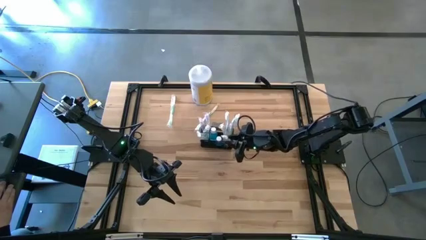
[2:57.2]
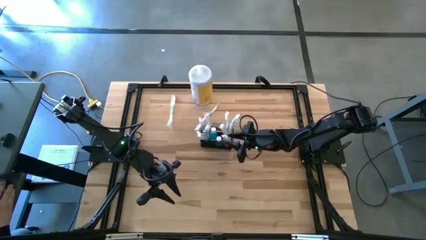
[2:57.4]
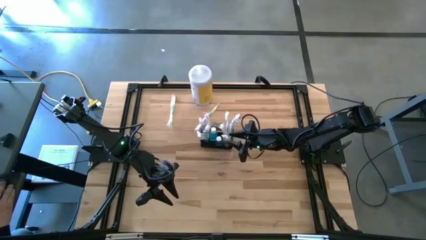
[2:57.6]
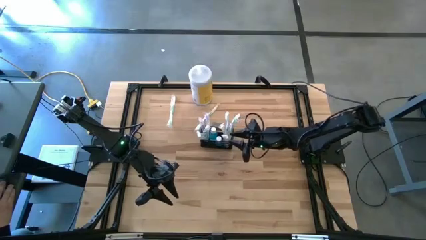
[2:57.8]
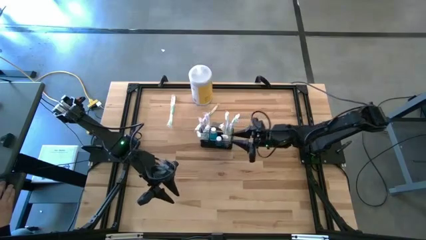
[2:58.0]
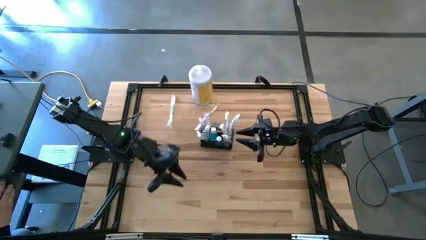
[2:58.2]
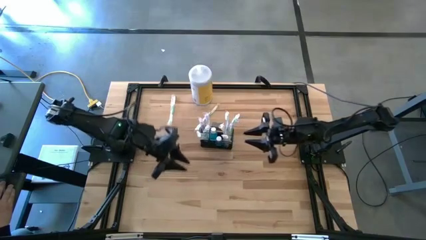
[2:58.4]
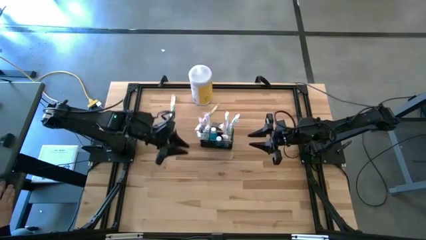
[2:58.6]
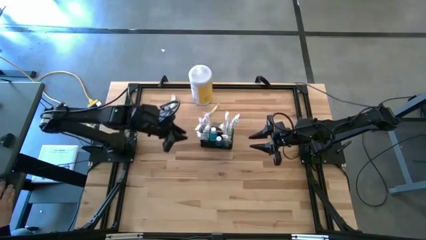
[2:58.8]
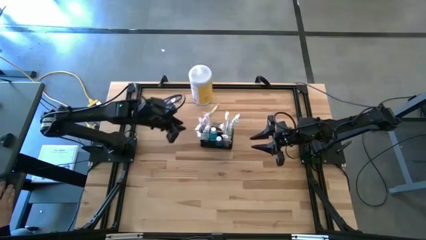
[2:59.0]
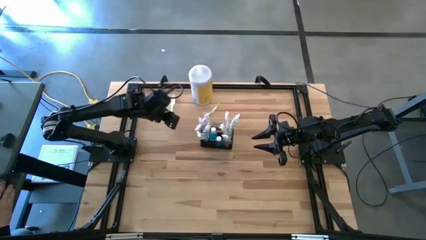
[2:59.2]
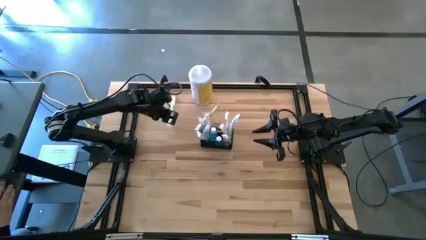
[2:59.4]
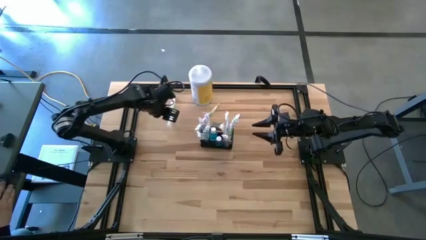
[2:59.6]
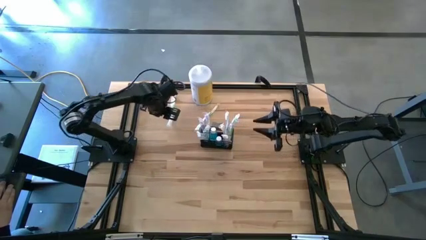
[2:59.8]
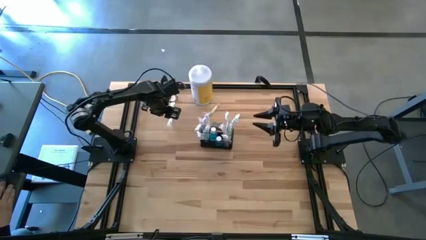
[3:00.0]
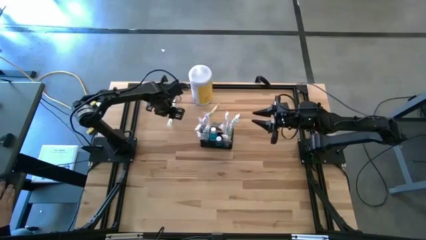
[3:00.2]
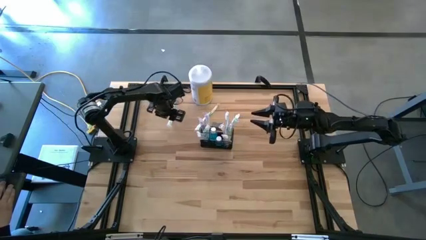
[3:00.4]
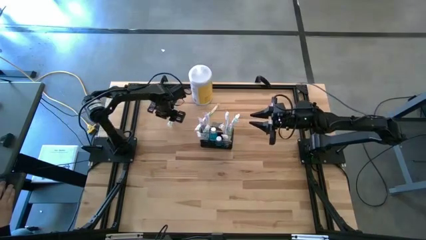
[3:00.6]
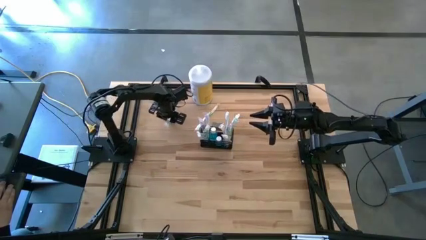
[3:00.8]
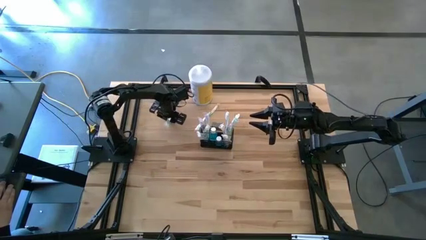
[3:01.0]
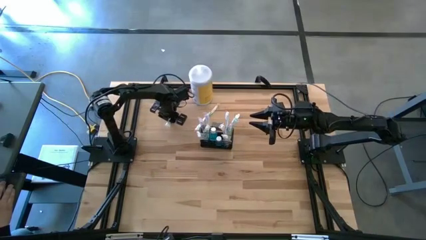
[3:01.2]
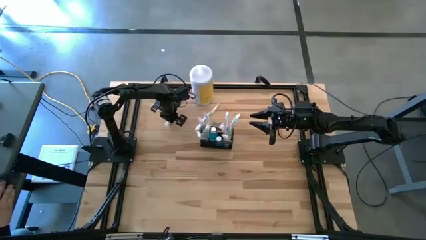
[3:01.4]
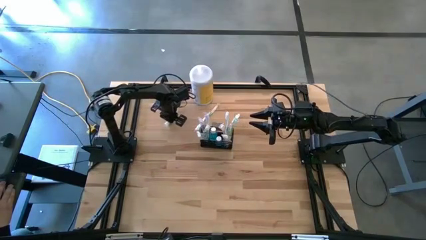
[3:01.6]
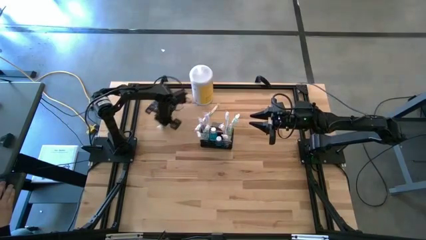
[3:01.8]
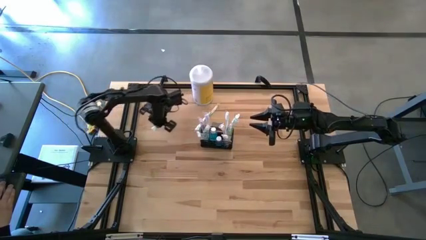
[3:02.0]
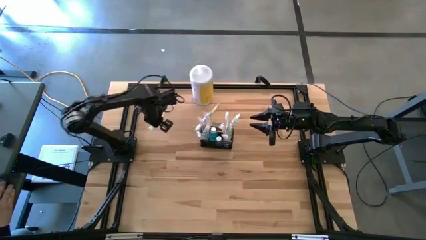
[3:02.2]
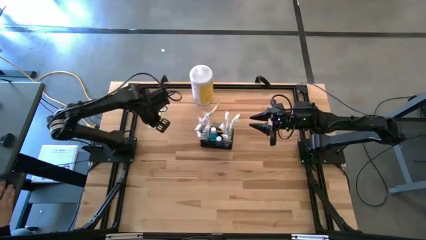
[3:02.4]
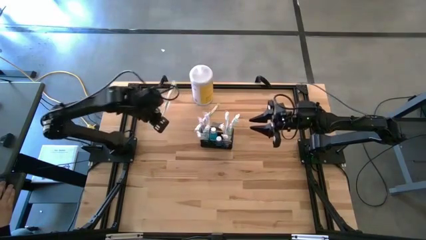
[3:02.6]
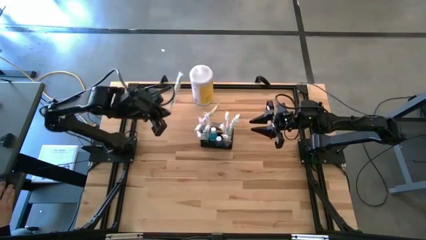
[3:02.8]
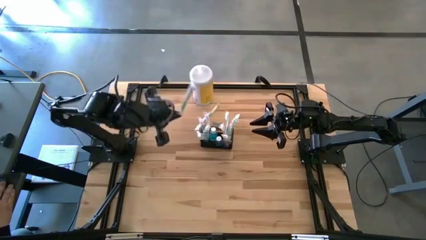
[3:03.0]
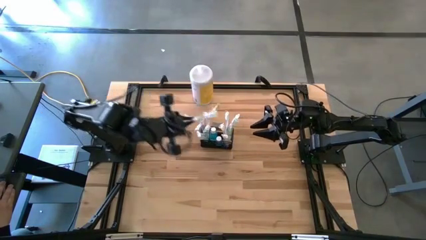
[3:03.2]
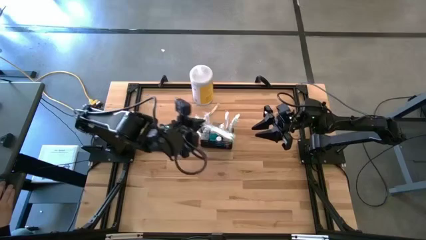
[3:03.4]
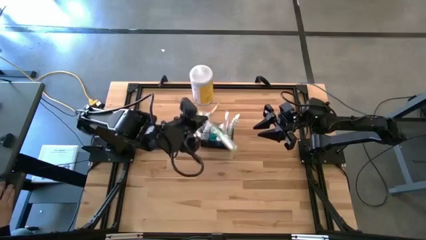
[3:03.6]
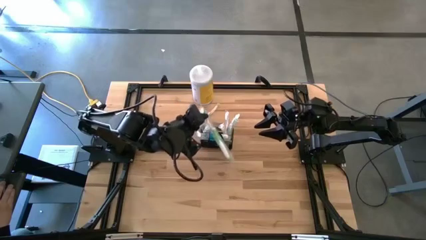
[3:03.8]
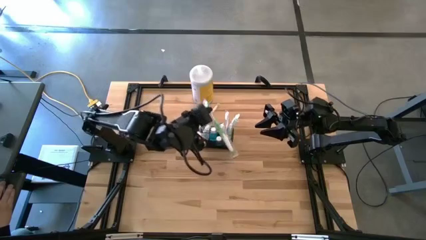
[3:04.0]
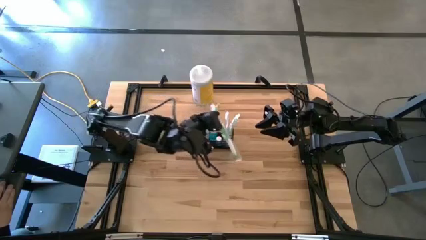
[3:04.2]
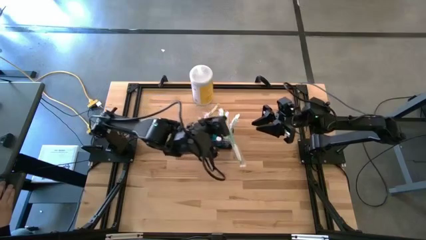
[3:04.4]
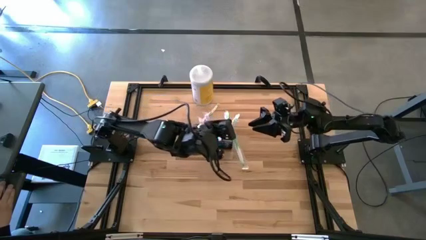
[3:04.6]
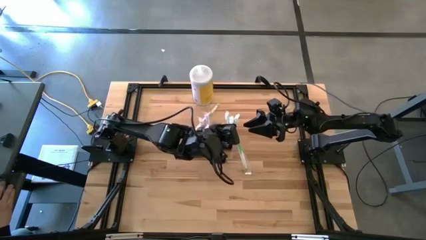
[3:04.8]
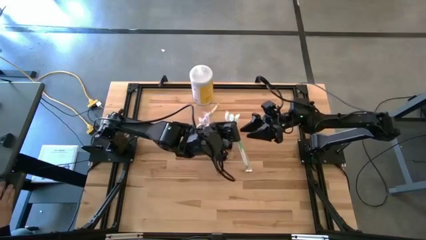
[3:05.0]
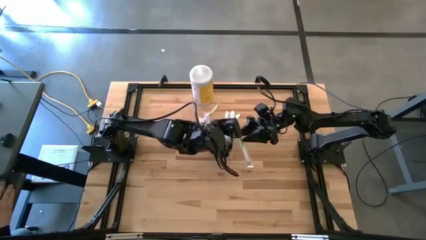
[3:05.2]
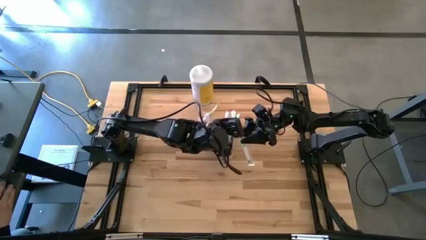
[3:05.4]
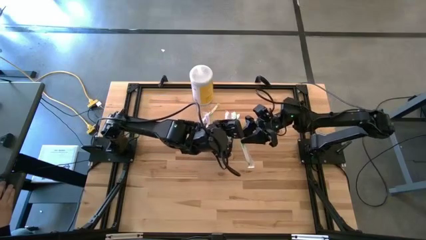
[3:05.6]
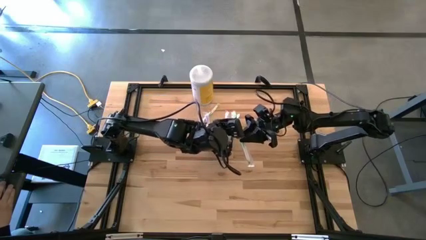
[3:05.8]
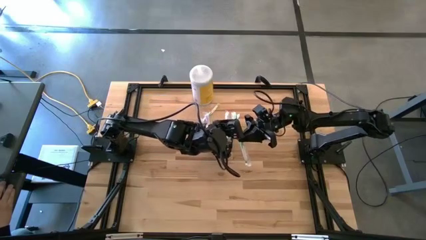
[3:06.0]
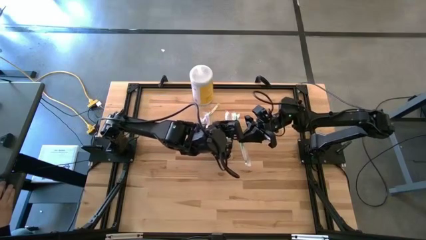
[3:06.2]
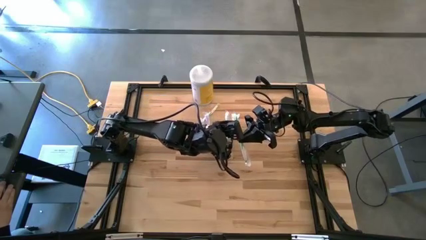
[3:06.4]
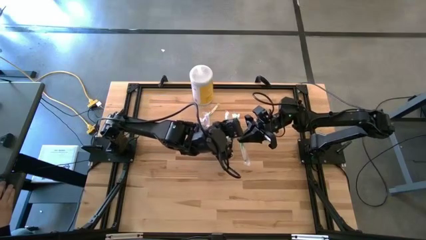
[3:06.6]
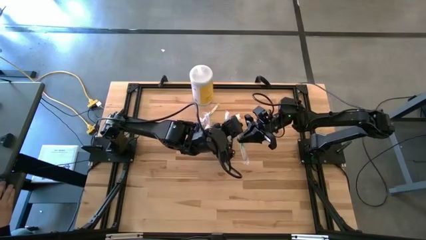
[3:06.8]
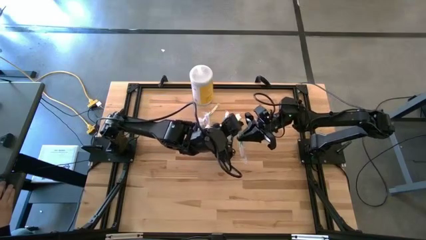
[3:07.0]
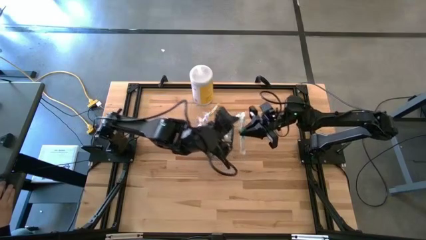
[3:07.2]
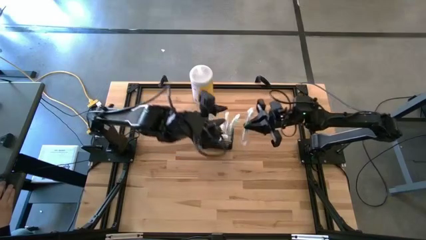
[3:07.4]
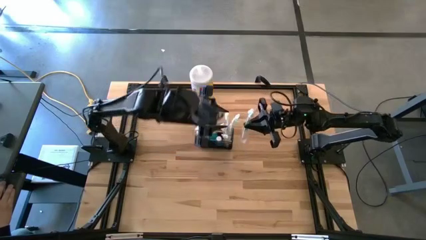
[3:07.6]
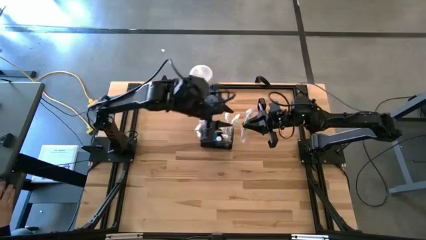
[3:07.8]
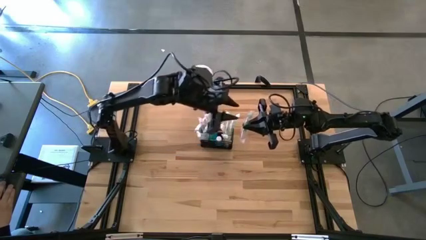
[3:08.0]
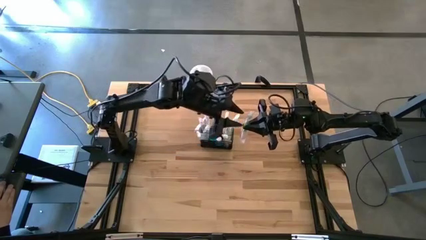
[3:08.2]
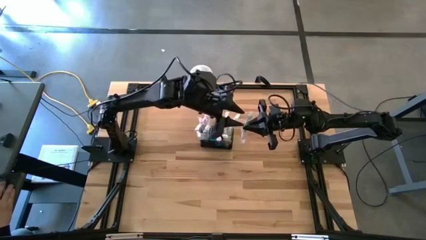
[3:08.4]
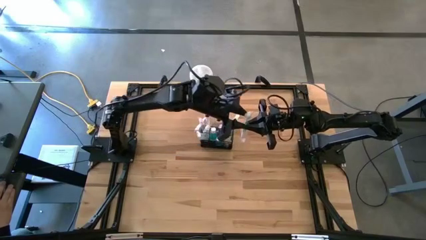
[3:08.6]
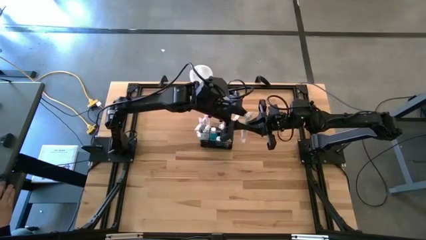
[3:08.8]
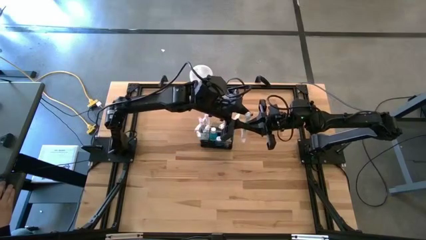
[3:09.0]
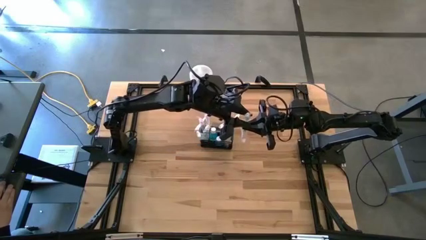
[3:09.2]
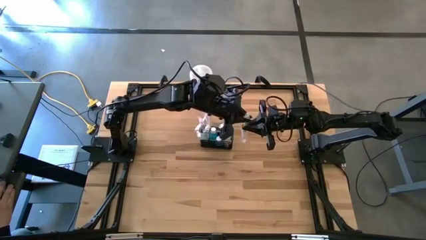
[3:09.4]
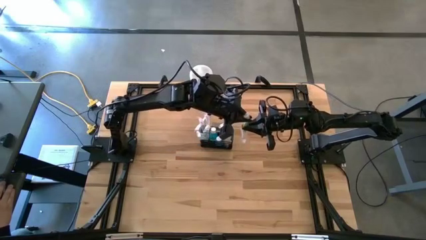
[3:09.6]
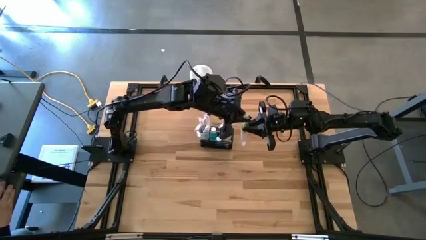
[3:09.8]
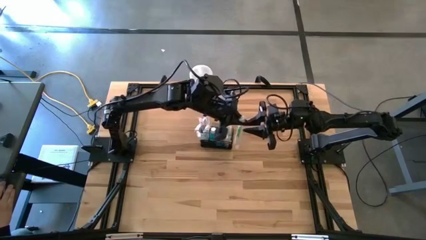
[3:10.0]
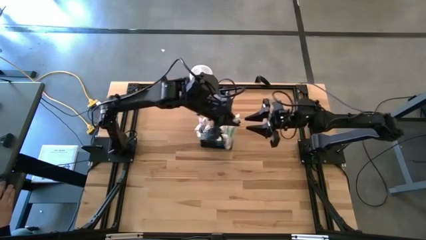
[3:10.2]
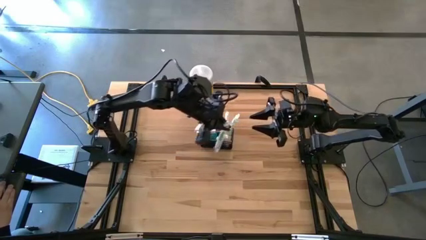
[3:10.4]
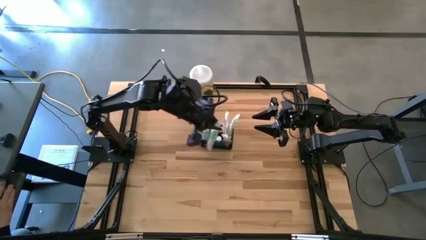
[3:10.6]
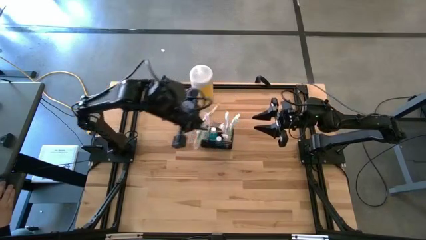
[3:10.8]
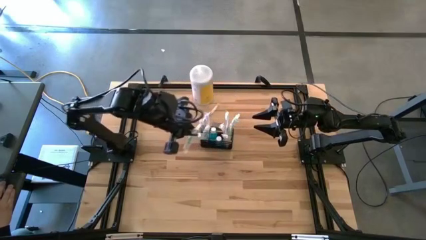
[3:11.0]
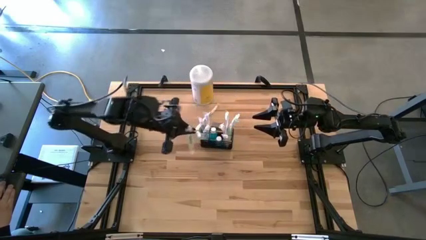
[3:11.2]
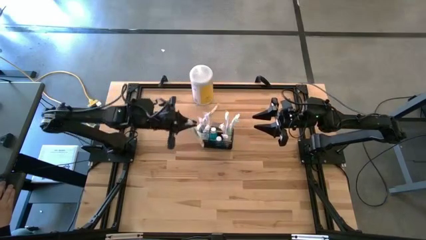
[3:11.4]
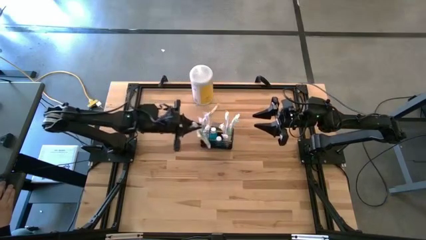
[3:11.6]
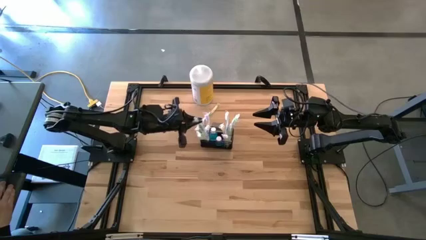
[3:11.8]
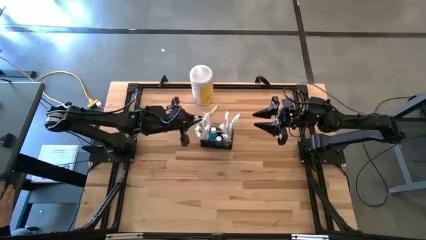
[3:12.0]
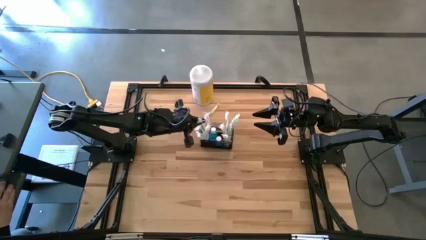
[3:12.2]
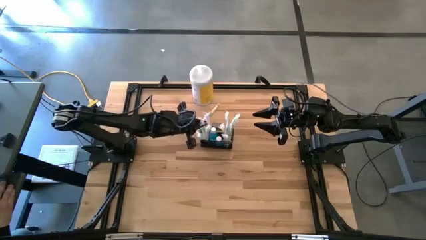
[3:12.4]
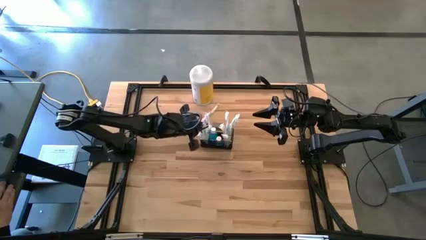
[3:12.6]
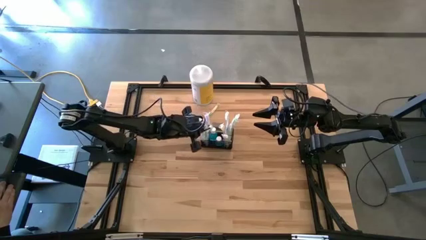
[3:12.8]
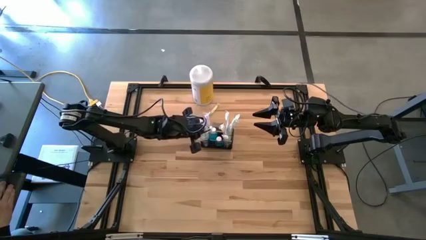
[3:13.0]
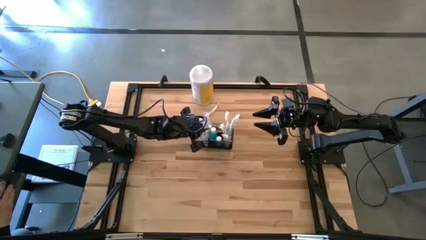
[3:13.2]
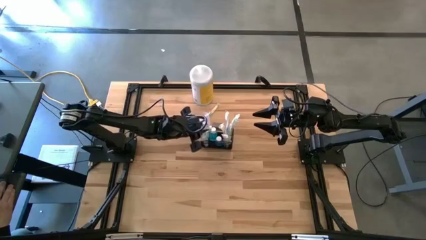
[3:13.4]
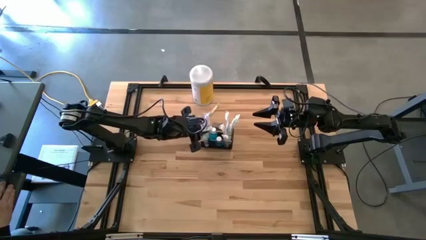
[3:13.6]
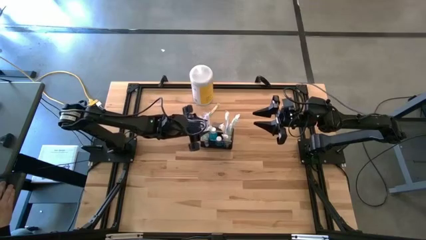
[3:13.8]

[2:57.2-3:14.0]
Task: Pick & Place toothbrushing station
Put the left green toothbrush into the right section wire organizer
